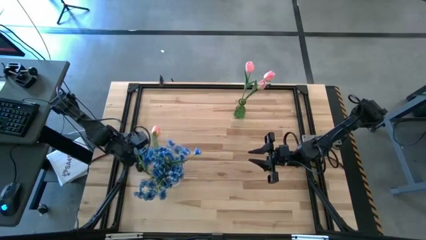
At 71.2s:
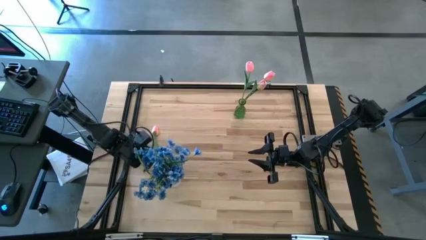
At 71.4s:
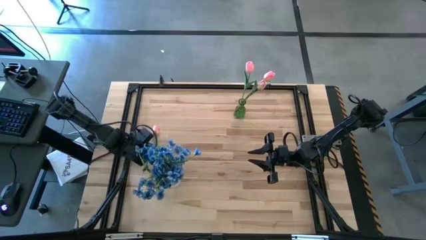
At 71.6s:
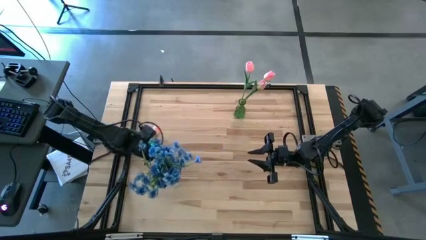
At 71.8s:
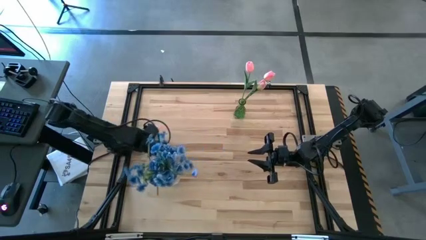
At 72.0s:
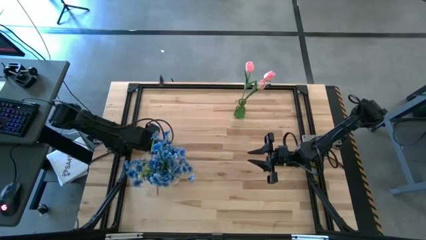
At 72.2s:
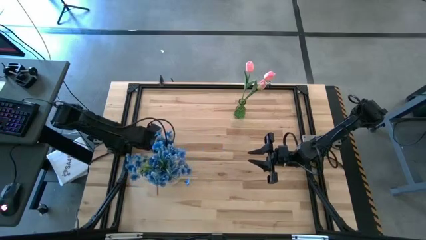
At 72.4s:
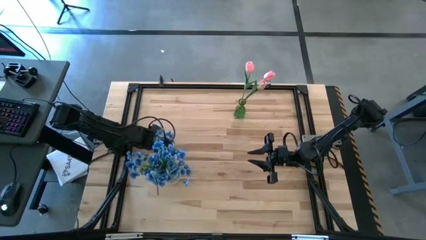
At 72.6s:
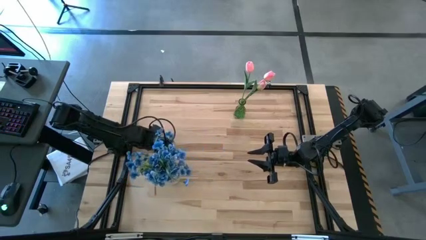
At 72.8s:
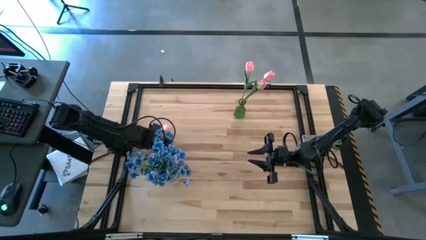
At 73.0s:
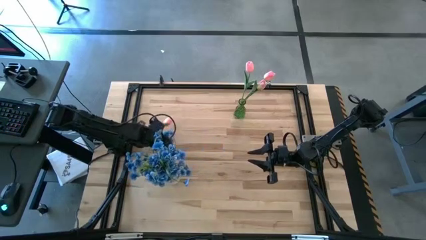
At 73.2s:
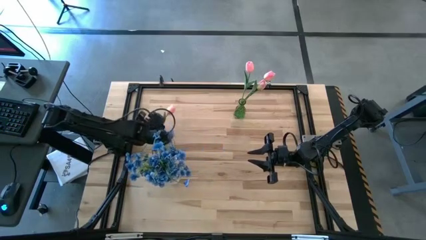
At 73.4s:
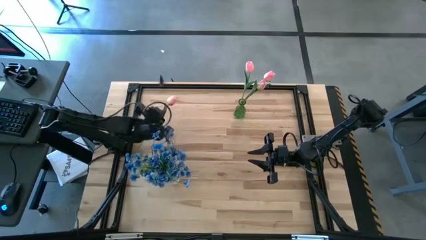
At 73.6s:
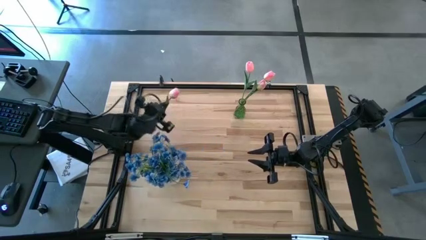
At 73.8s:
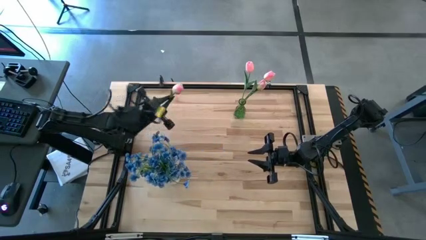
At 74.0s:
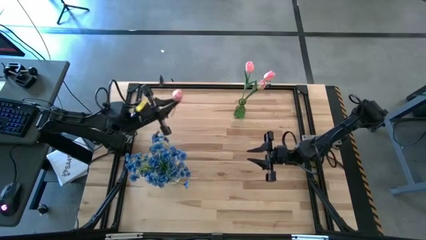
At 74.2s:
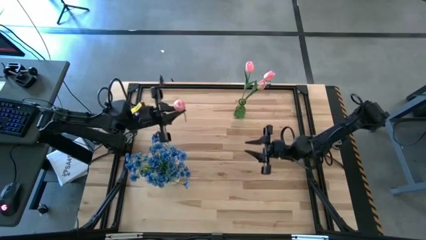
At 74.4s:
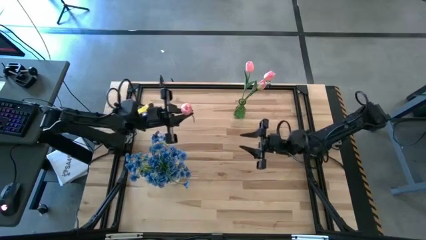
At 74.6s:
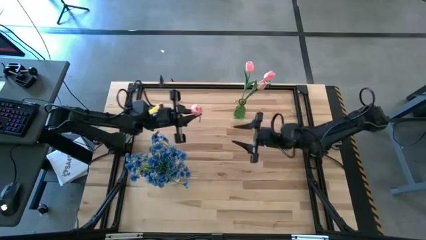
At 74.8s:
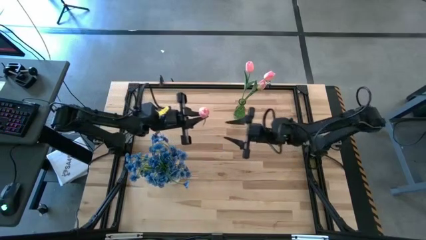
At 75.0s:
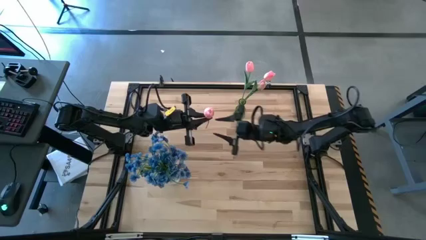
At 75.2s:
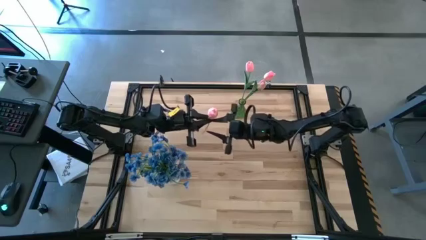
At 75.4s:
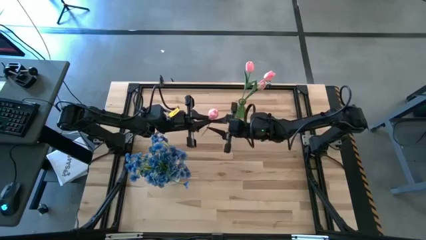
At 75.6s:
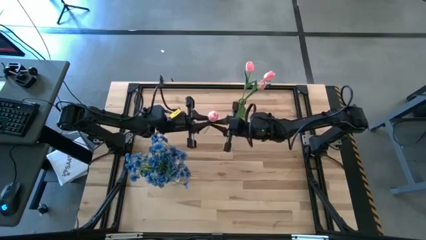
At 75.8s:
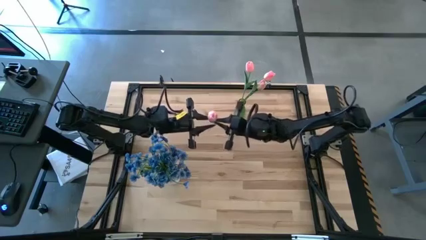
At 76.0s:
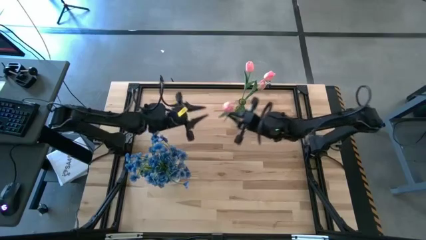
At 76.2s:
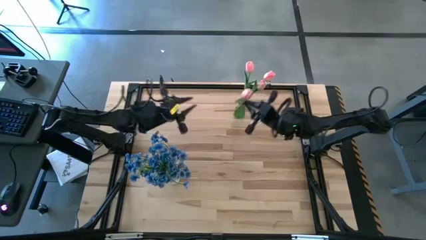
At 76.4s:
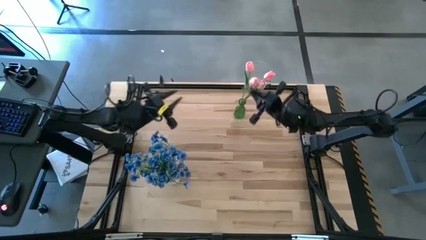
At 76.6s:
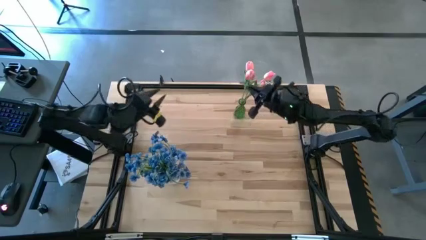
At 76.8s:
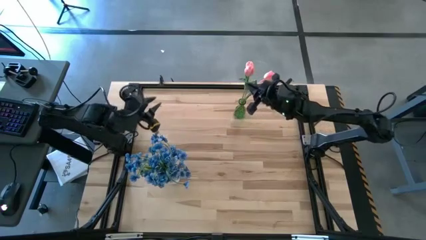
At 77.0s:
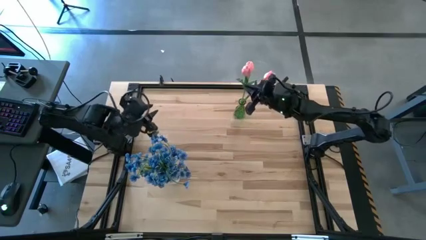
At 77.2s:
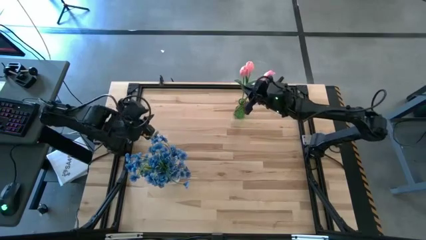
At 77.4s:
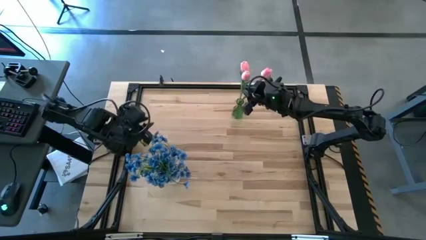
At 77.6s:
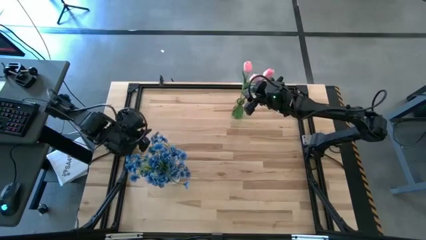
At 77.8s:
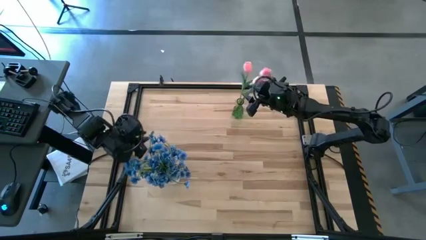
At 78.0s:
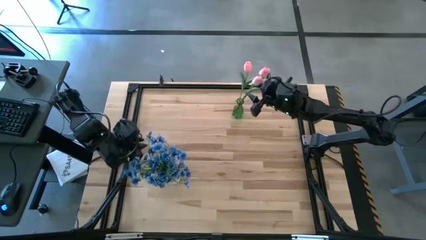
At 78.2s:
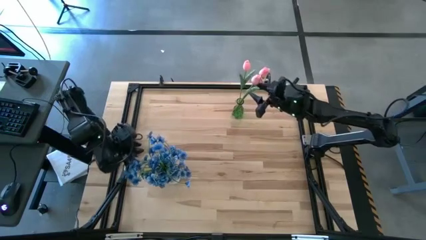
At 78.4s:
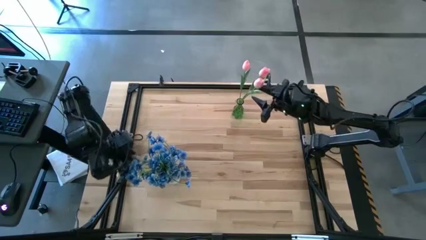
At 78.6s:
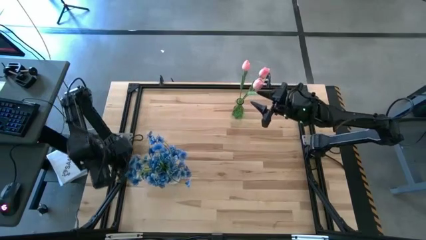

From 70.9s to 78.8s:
Task: Sort flowers into vase by color
Put the pink flower into the green vase

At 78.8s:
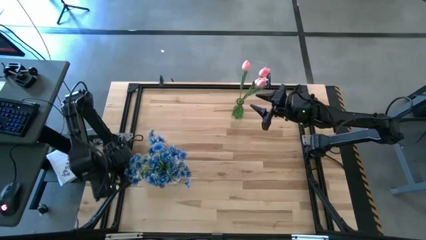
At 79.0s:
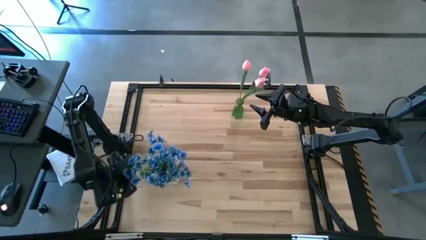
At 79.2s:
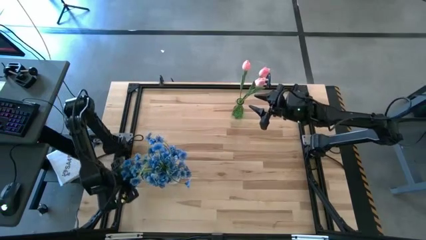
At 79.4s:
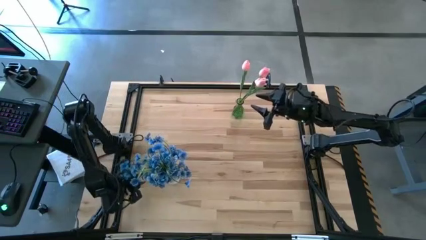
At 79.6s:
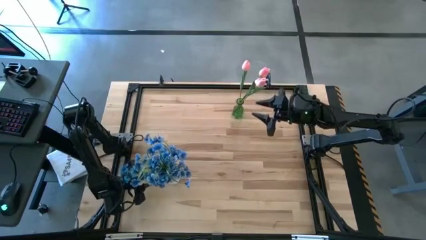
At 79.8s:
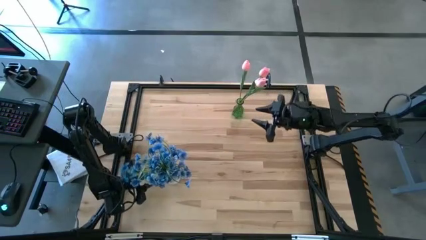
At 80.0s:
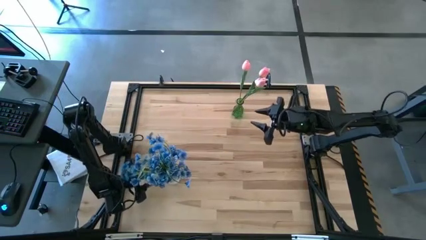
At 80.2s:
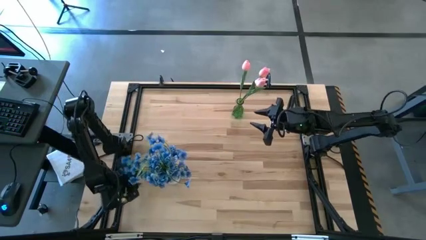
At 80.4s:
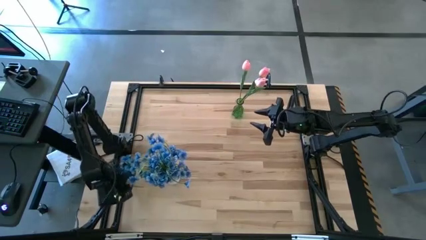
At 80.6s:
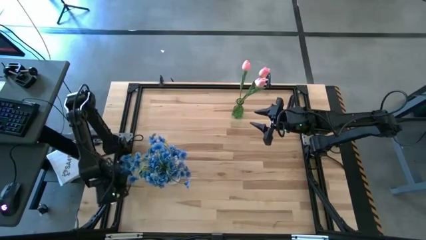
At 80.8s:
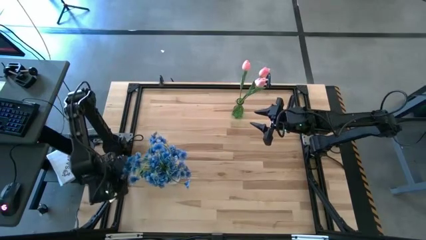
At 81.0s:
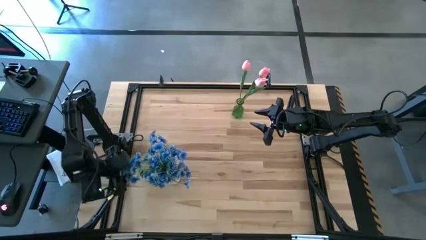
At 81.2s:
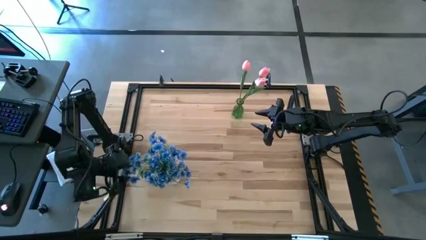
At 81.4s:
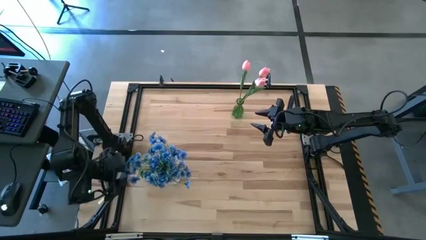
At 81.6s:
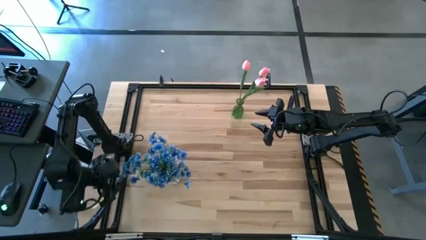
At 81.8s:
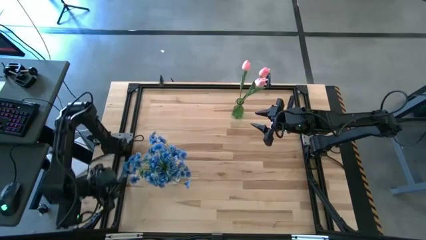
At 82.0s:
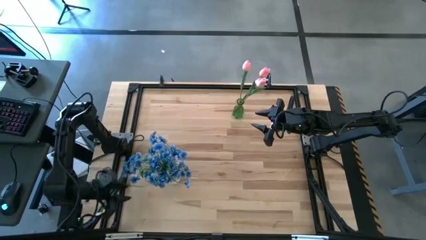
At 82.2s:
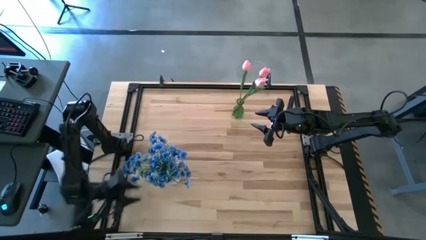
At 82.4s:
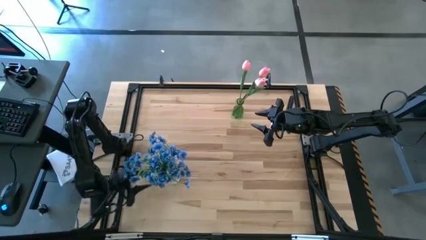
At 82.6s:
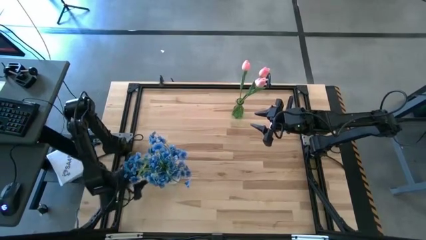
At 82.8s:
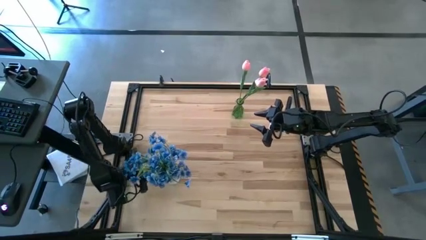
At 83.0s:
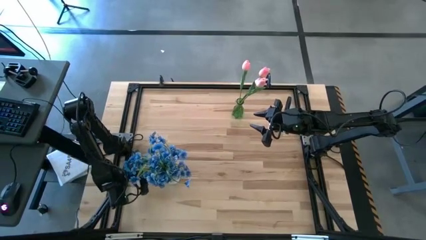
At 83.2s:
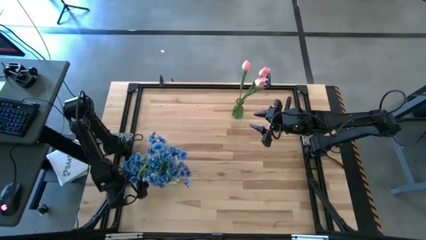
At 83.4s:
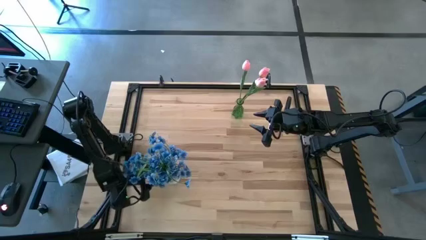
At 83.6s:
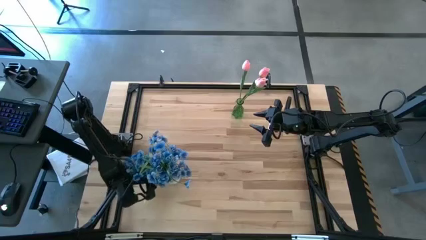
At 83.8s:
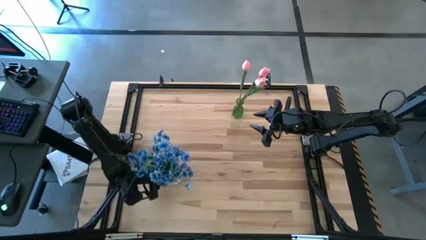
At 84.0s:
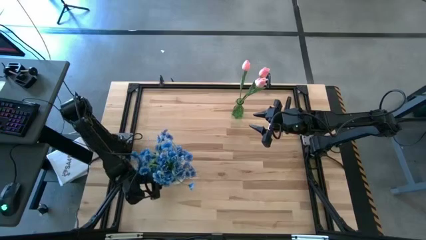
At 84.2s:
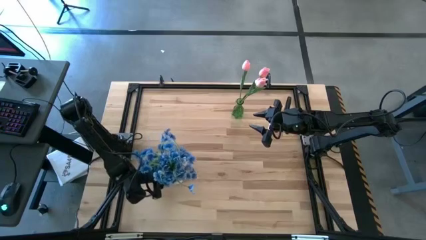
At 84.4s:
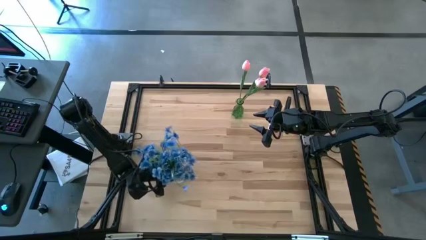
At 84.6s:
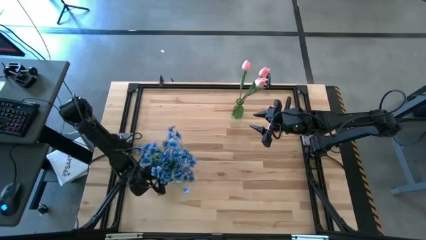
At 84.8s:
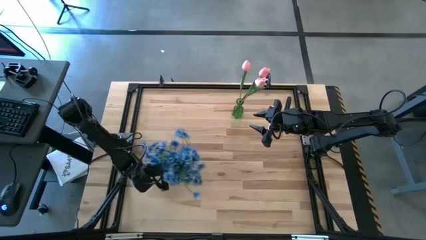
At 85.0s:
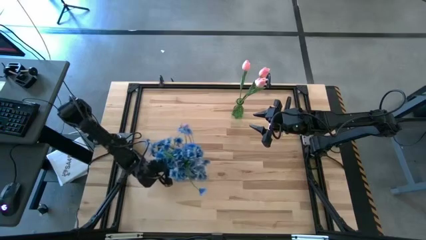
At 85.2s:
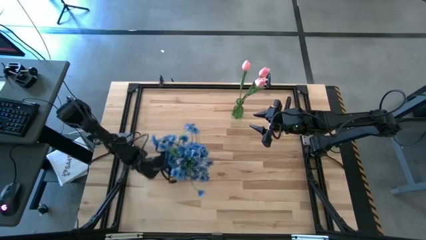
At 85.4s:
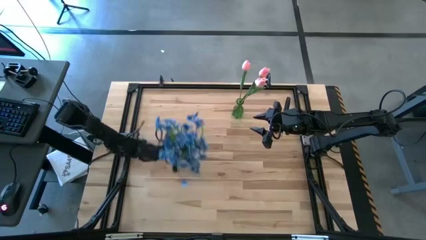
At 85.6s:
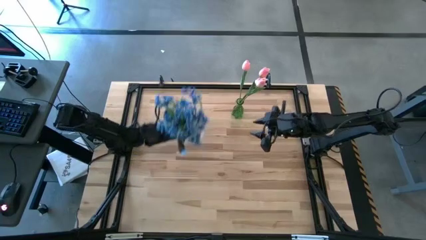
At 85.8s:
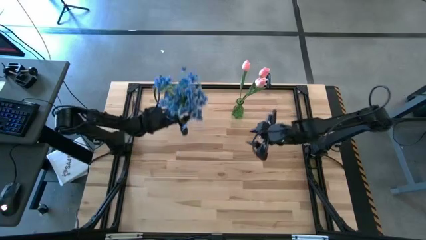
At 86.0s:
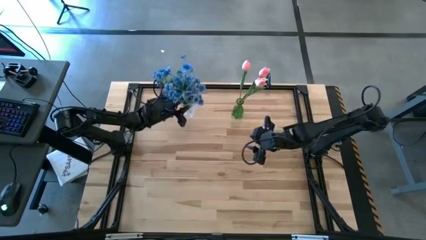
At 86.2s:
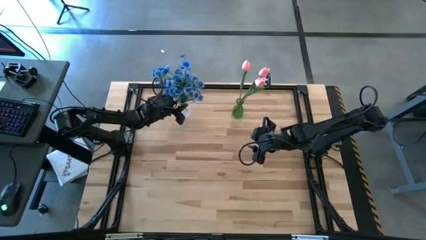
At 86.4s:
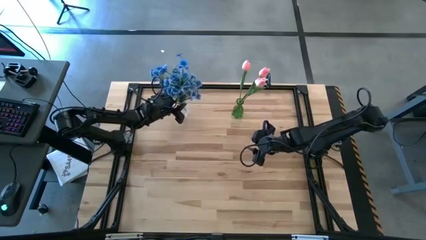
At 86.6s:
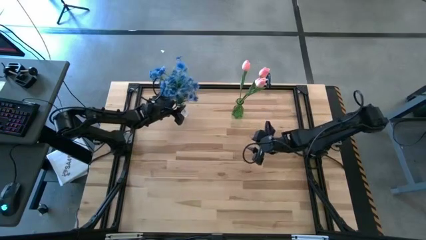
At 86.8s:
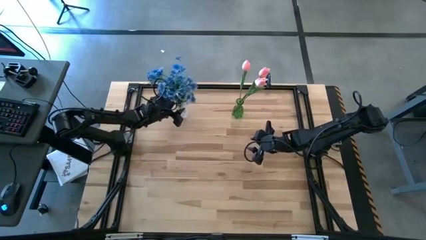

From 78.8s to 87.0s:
Move the transparent vase to the top left of the table
